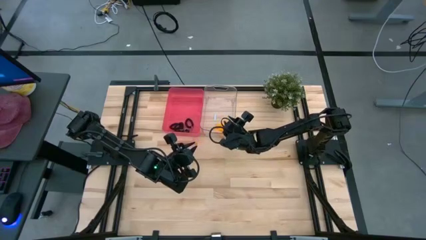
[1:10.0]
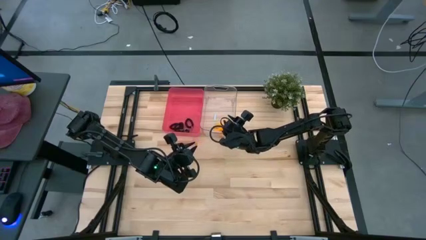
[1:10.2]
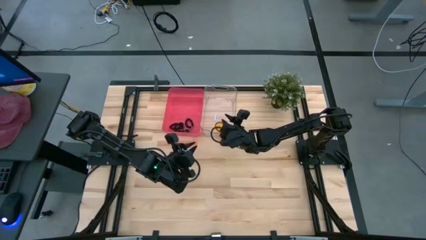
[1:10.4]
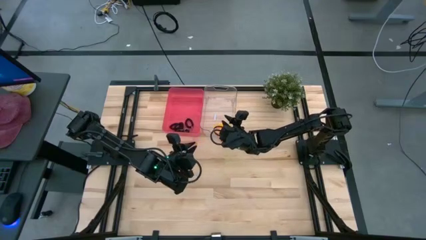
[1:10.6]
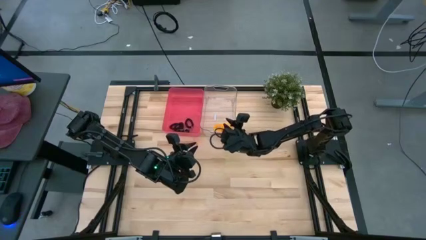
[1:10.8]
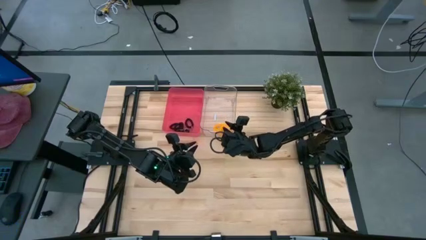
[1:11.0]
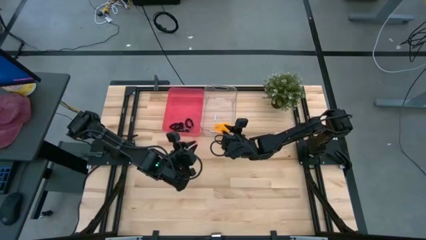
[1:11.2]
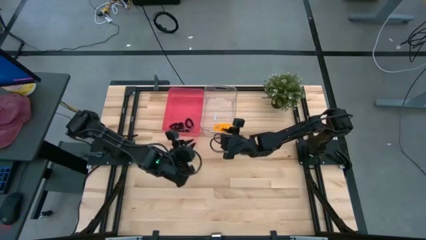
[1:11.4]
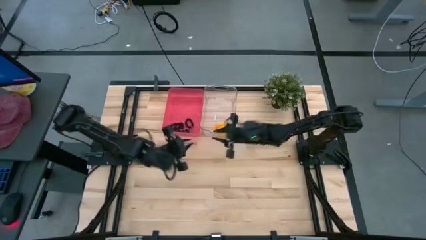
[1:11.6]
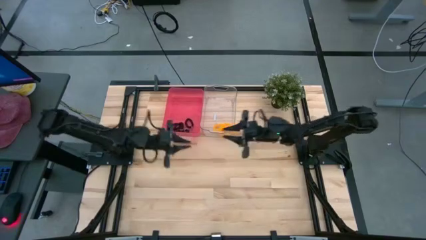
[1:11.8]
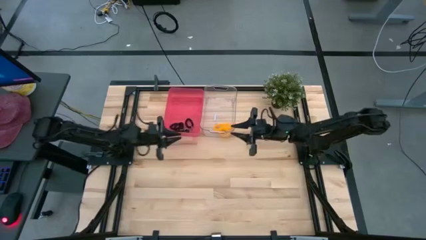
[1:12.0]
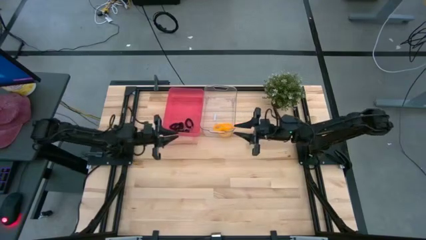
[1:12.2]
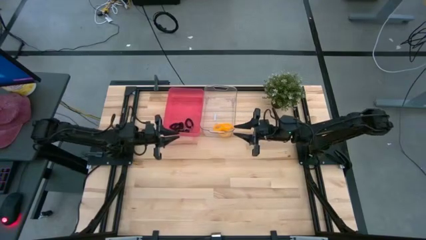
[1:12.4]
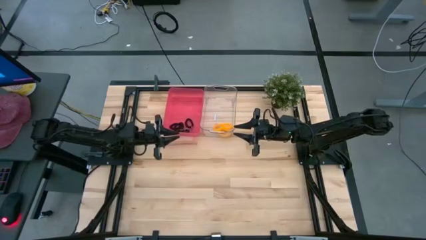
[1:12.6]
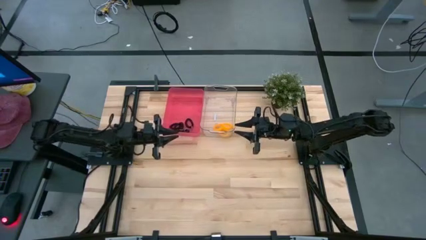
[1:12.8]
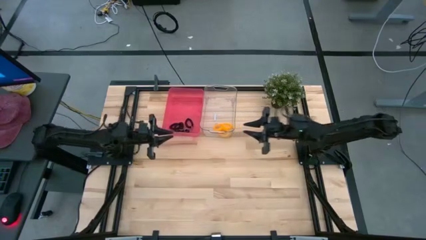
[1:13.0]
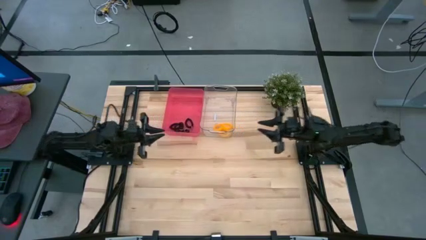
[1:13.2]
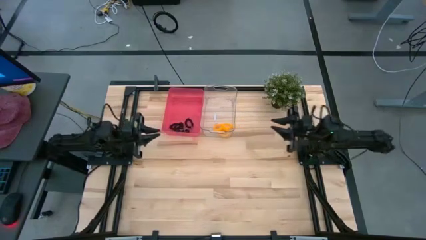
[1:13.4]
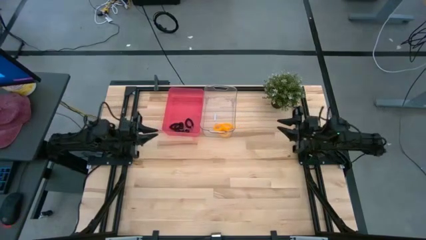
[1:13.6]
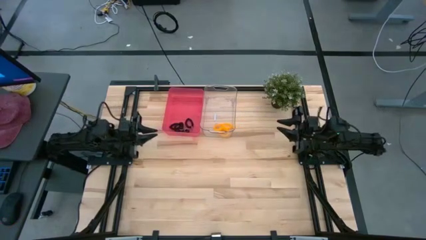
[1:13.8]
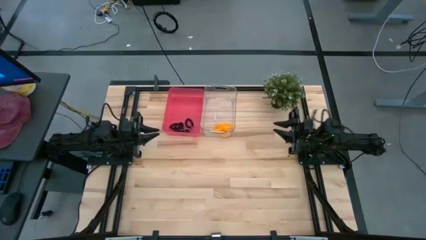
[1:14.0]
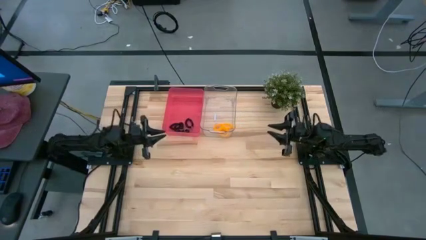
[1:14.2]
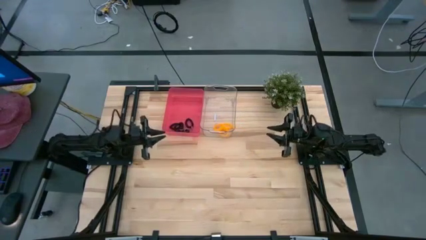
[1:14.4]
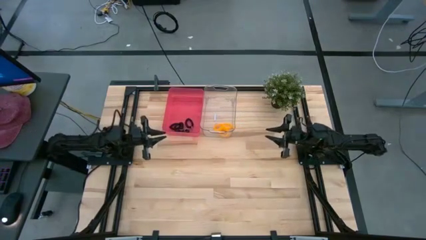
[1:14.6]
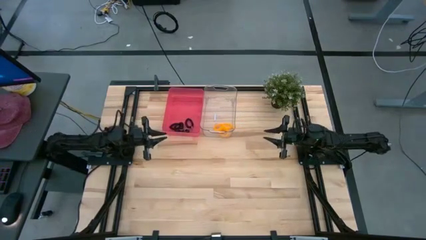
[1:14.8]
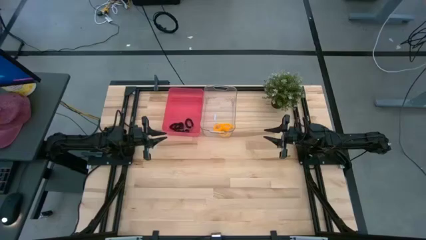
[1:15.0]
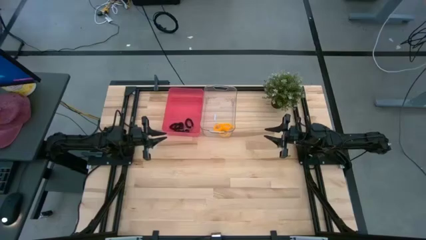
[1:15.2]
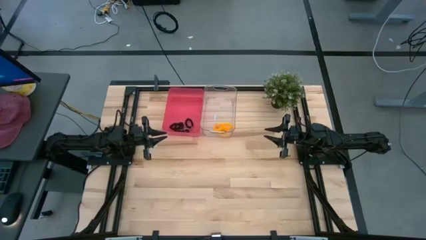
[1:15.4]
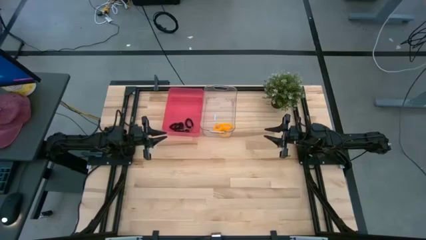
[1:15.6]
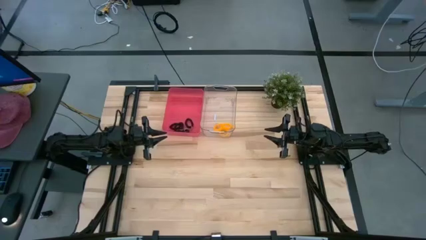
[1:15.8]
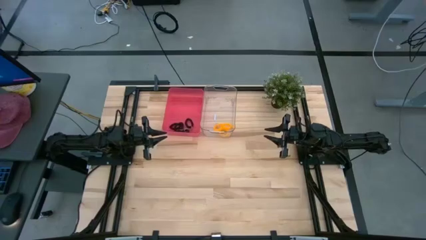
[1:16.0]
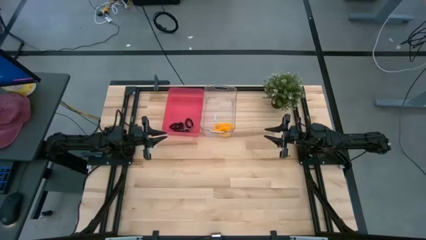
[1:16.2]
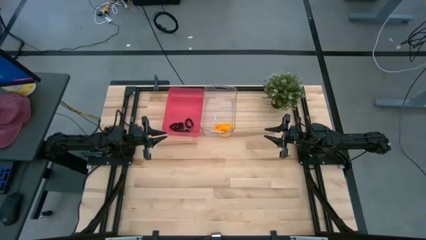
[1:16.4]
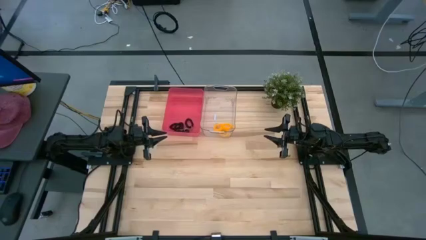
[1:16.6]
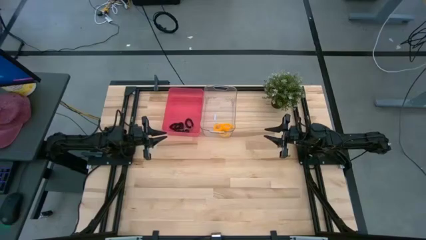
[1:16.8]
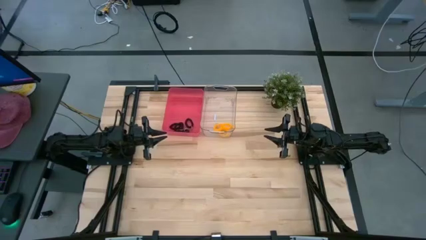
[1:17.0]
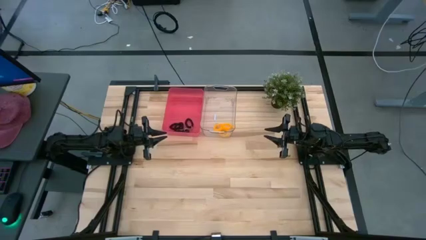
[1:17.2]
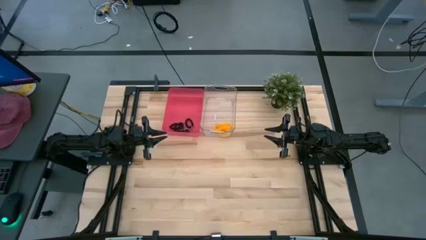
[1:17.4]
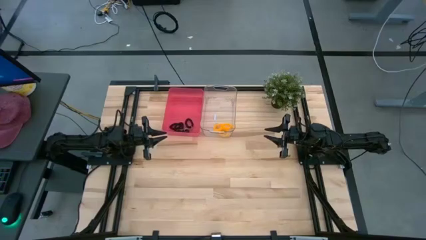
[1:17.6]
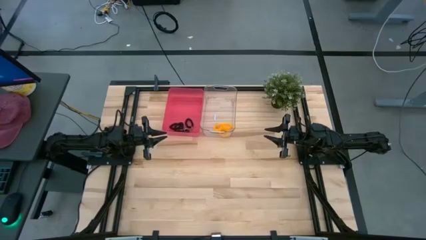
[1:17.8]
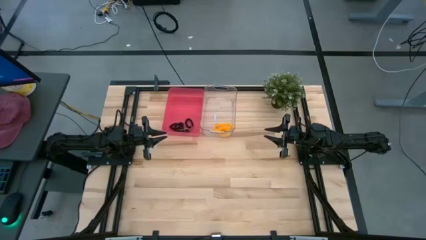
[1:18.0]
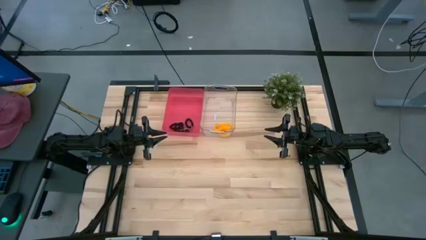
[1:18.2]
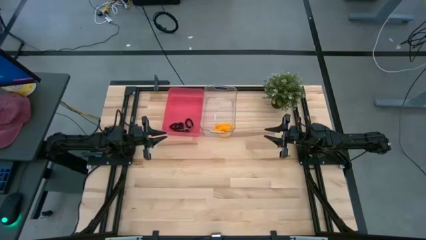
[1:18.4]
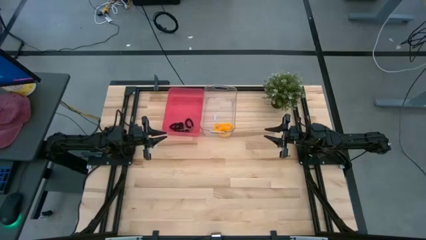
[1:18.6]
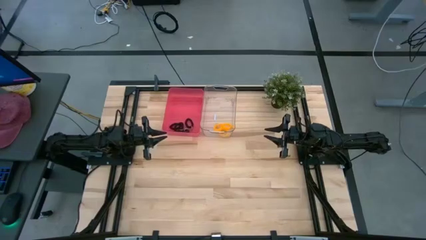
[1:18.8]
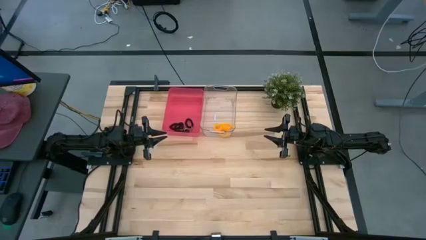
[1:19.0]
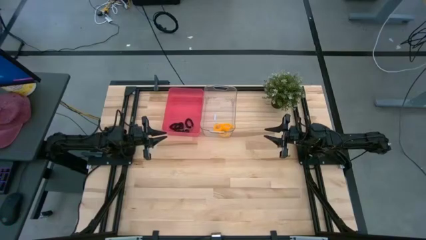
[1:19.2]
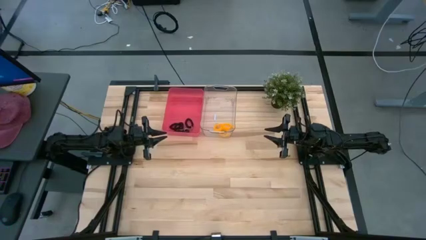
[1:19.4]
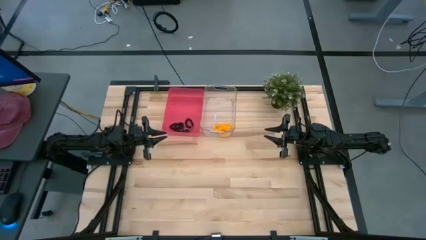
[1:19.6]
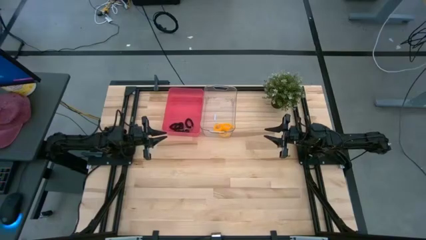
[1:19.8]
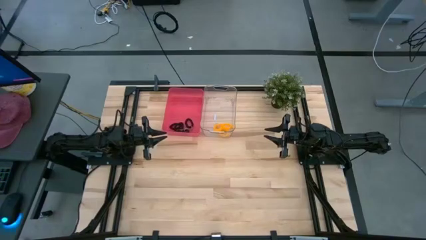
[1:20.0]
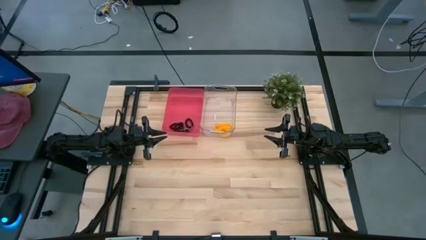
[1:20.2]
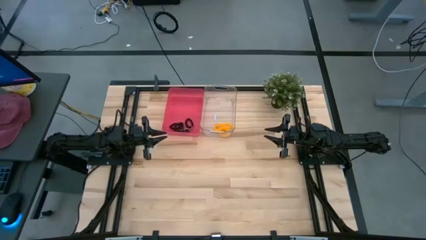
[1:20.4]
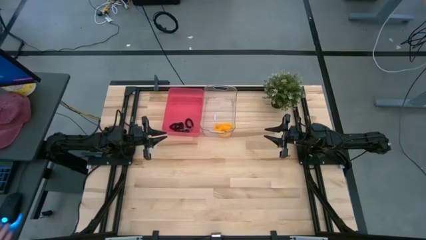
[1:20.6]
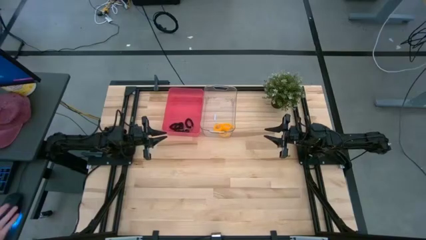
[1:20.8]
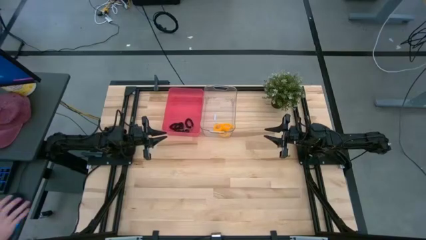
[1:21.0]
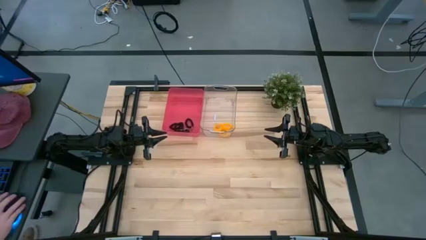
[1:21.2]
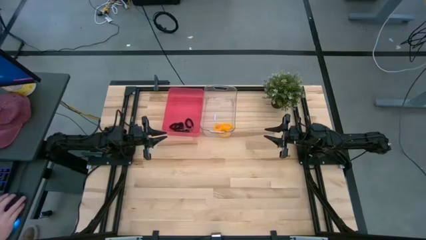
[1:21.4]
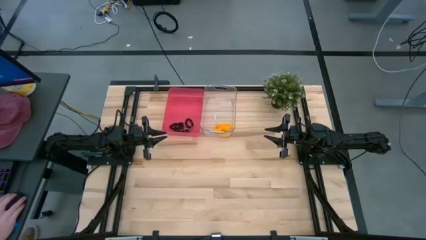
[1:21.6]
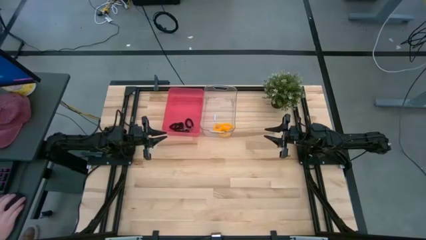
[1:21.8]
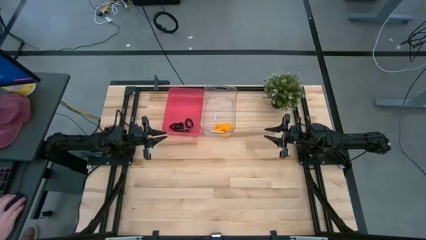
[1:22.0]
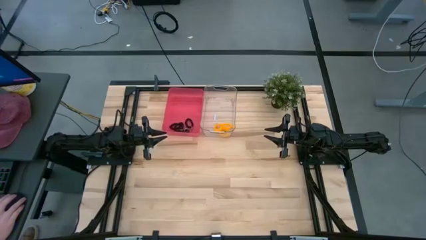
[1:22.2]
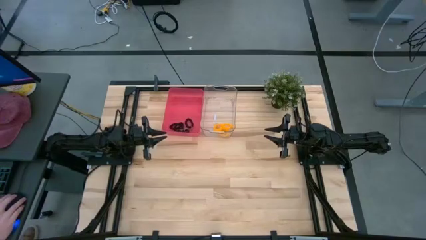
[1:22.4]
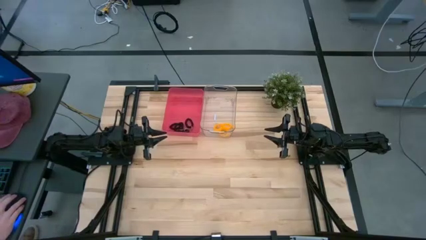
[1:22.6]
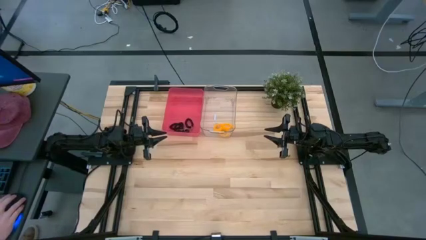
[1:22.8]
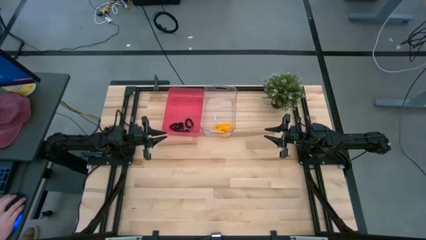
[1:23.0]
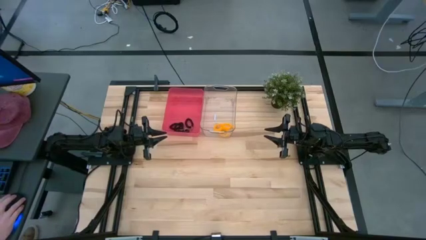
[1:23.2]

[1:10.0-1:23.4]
Task: Sort spring keychains
Return to home position
